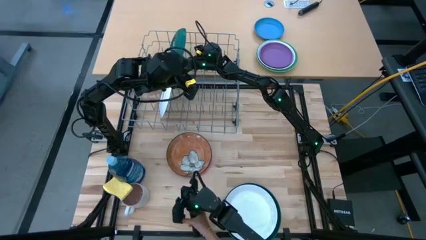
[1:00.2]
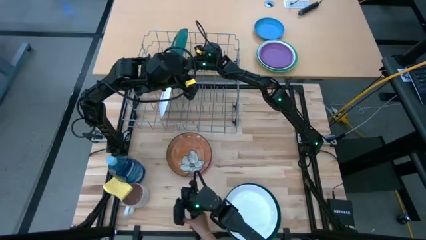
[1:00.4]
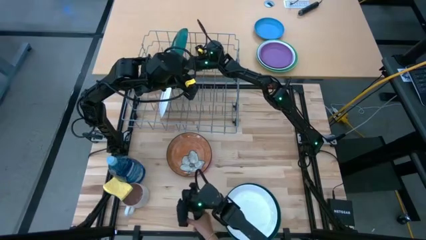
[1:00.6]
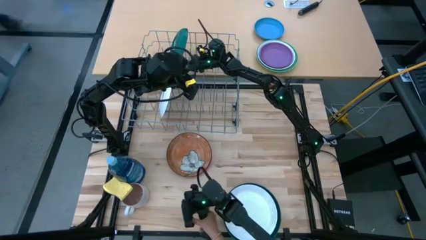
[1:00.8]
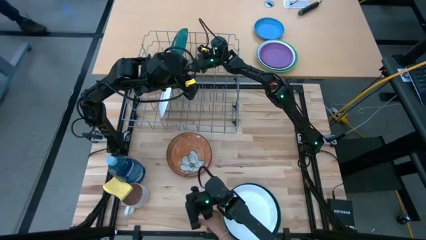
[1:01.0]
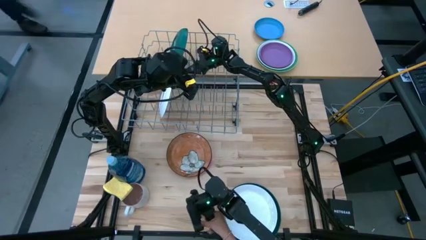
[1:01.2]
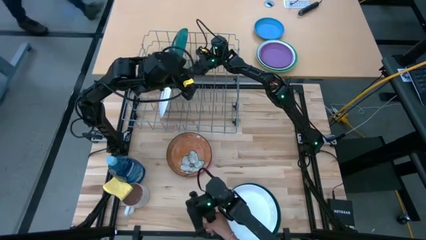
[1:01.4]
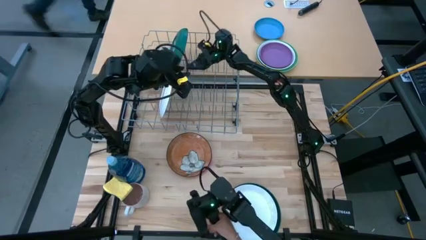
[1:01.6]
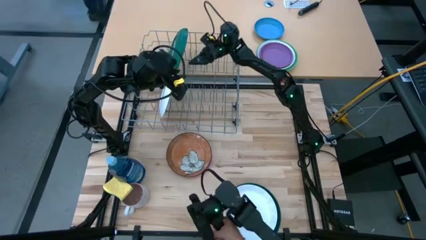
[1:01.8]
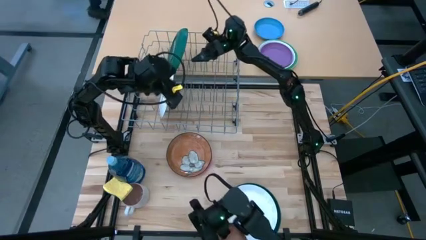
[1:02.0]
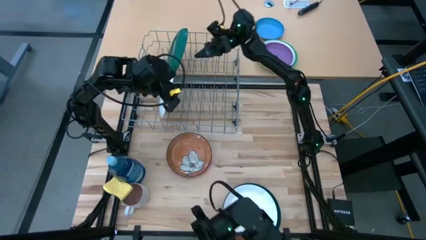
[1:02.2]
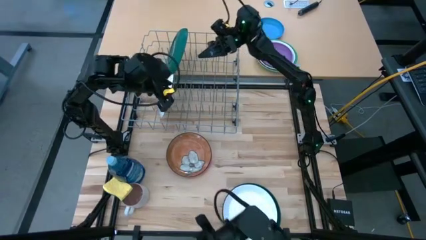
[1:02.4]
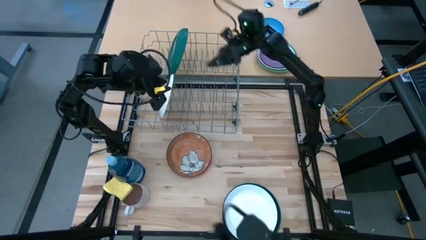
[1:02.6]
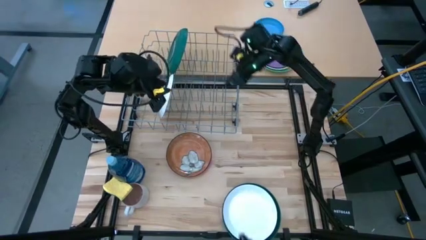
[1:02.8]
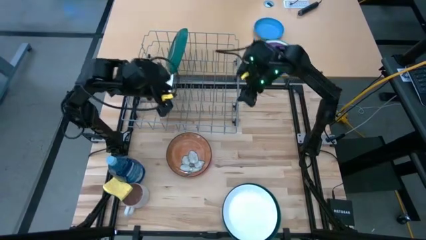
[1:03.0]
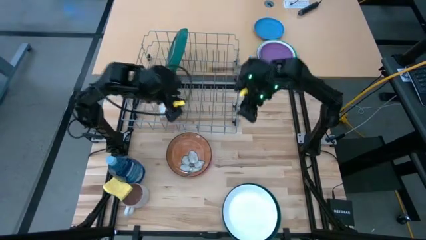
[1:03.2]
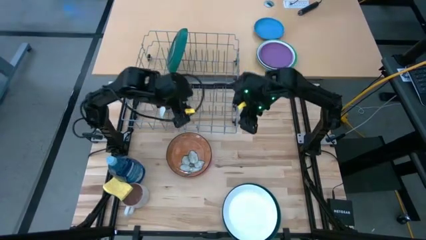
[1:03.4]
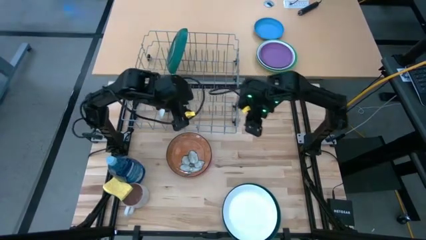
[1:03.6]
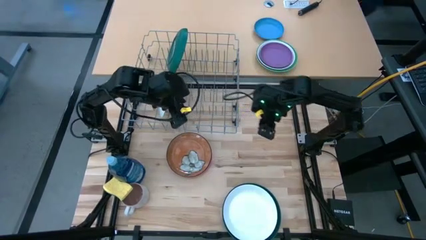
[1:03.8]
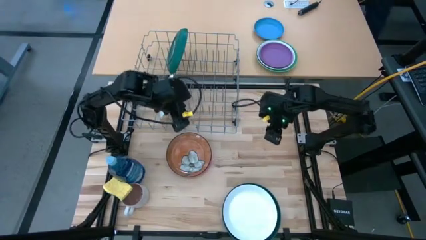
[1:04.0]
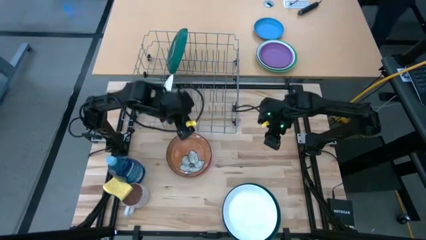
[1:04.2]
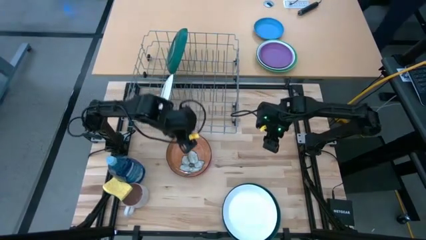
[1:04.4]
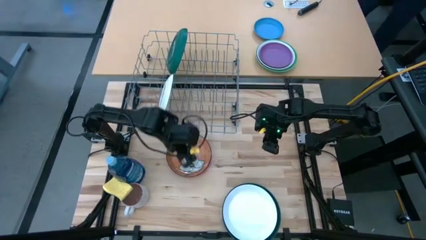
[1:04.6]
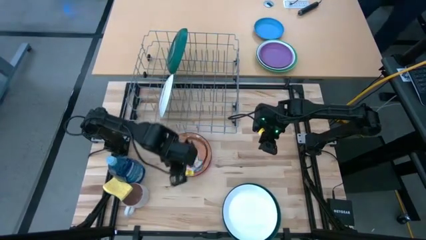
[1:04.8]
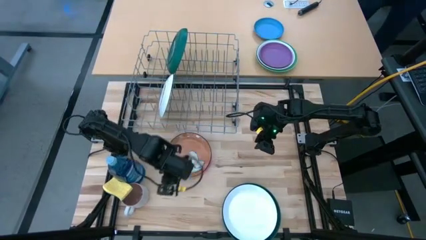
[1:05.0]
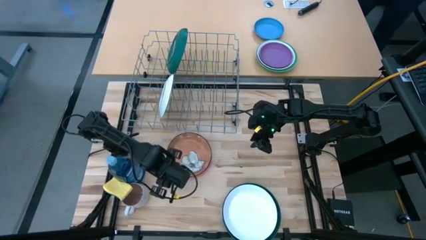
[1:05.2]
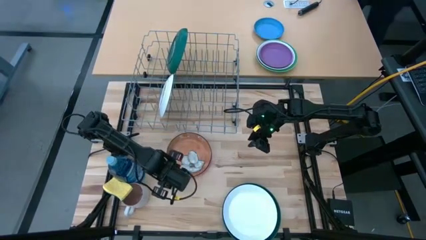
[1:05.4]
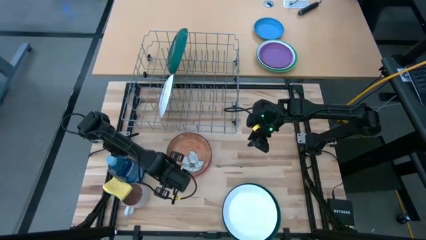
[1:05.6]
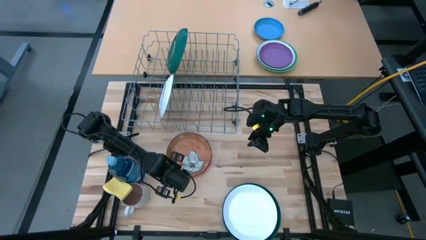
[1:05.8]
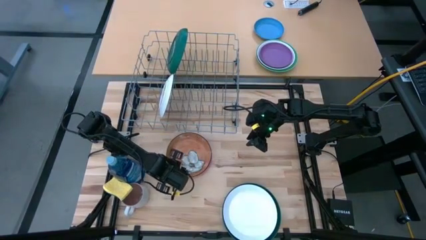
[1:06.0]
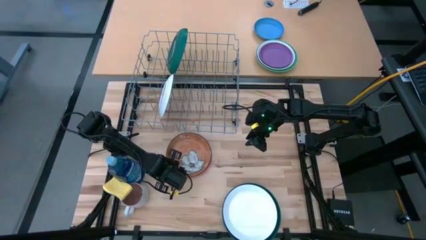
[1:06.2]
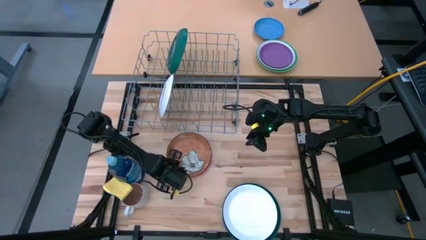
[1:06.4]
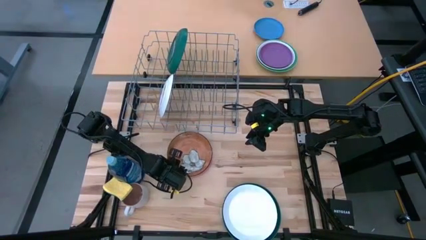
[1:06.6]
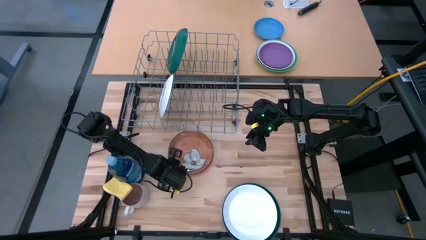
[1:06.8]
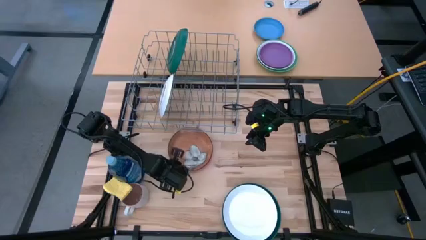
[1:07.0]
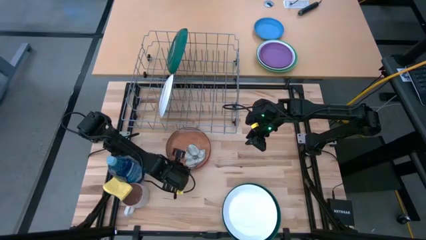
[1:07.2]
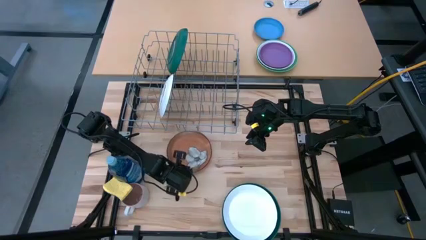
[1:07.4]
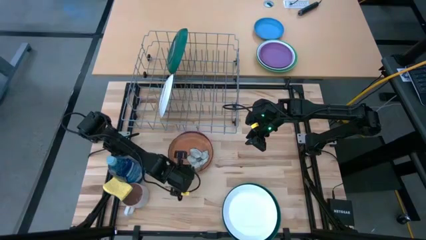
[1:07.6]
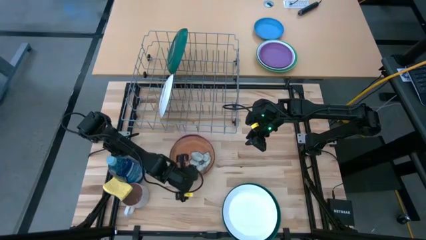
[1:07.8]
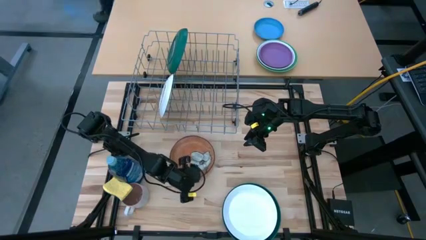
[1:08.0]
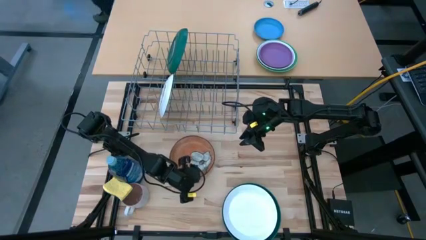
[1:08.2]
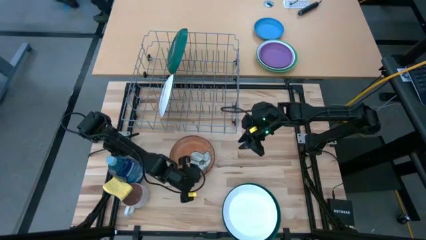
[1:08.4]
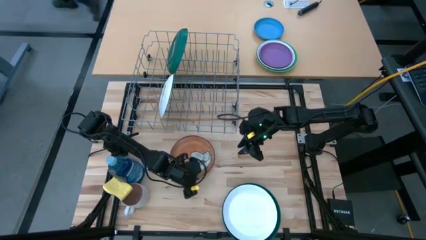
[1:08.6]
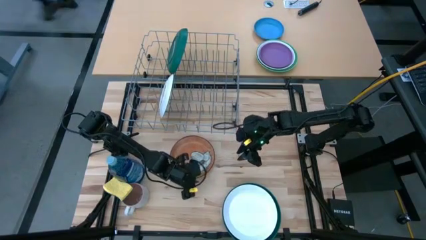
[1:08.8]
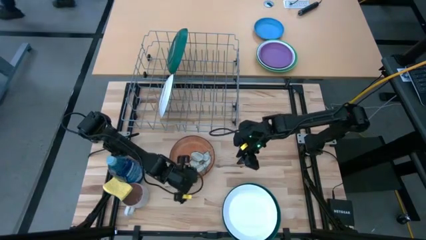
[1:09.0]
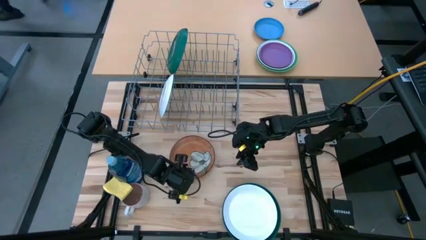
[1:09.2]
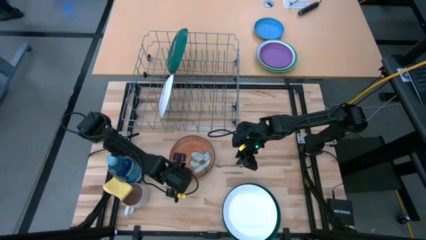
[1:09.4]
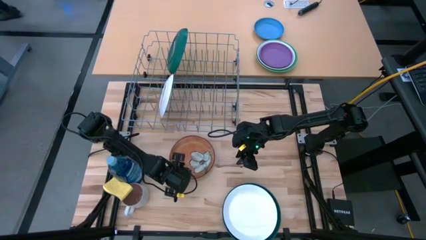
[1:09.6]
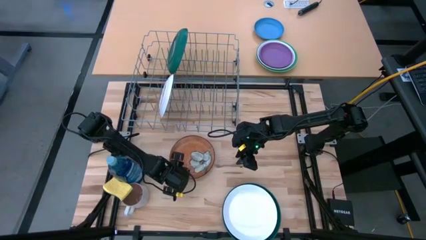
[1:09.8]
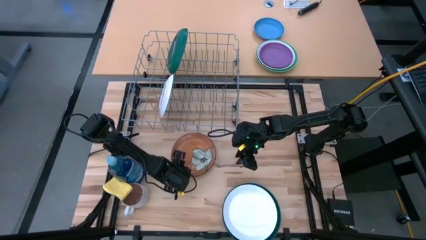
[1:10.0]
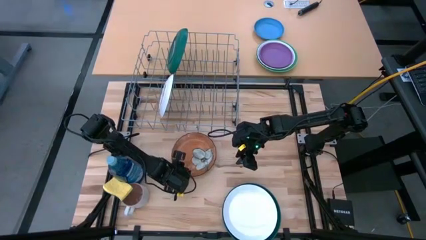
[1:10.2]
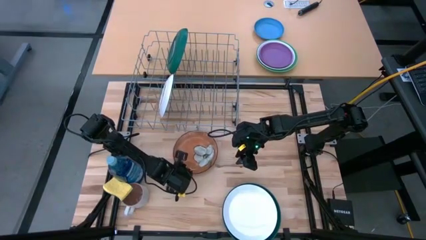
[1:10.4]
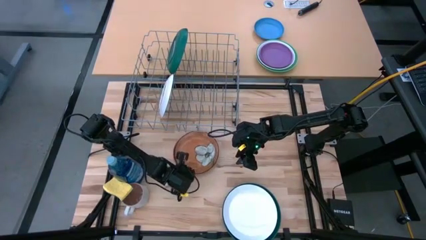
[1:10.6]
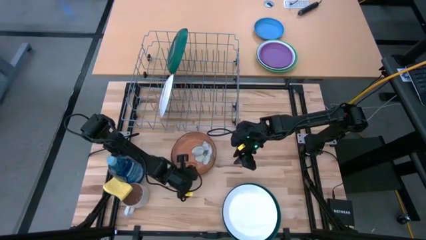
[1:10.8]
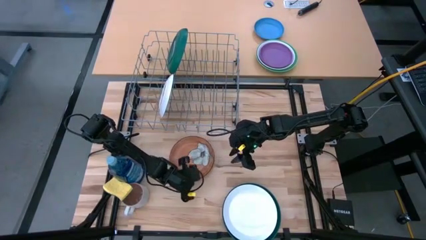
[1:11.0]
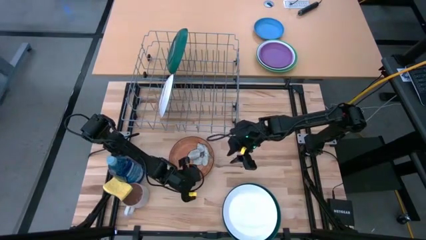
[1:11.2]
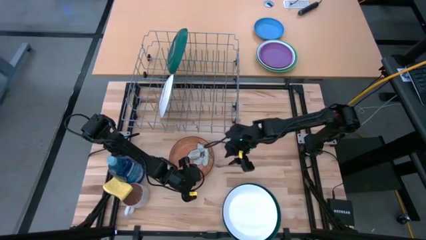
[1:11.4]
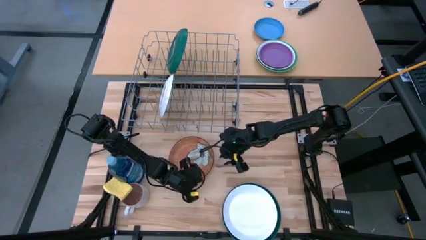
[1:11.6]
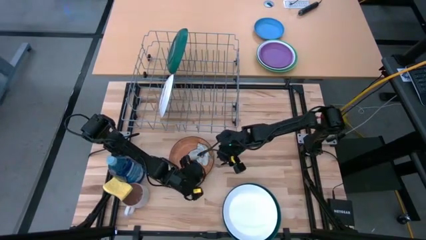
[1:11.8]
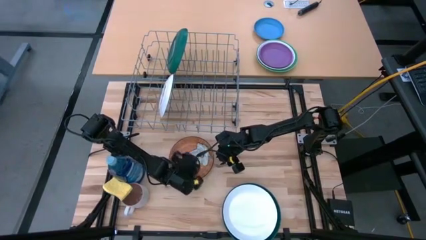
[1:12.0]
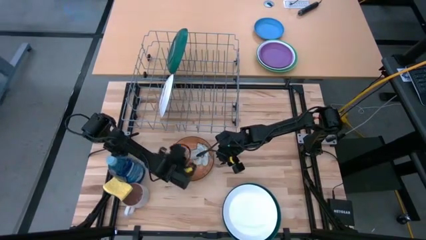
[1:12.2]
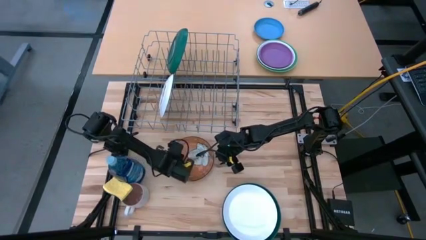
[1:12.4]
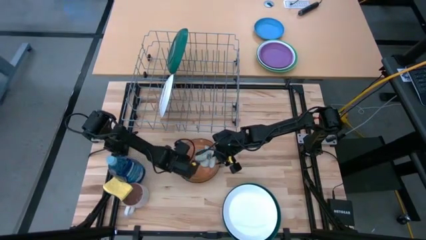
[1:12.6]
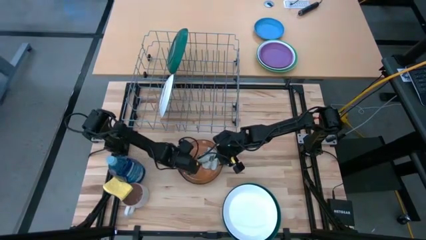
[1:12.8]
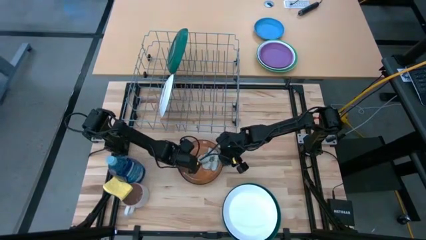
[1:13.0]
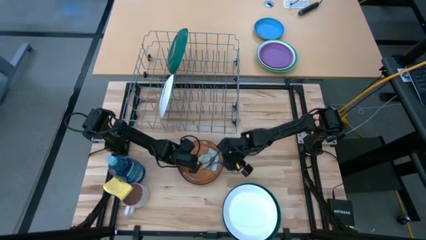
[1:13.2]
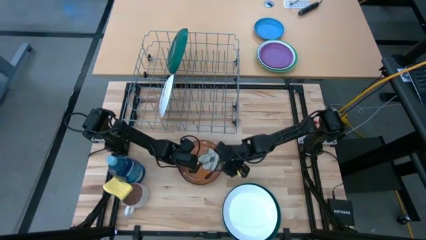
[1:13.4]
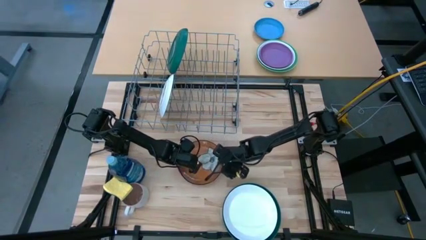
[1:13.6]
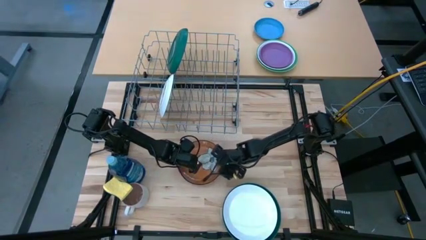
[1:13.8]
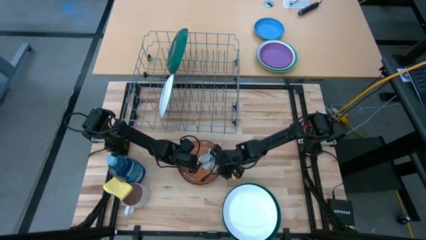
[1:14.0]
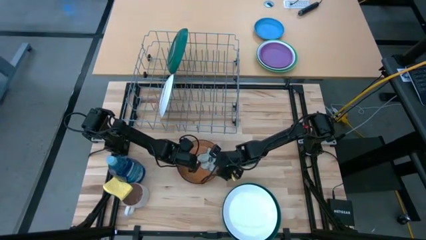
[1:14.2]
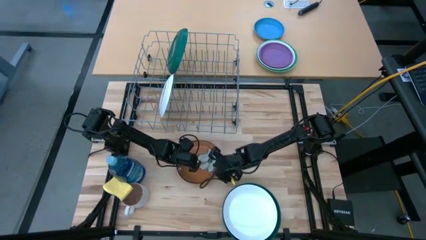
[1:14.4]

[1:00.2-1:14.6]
Task: Sort dishes
Put the brown plate on the dish rack
